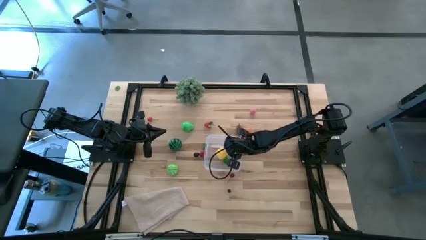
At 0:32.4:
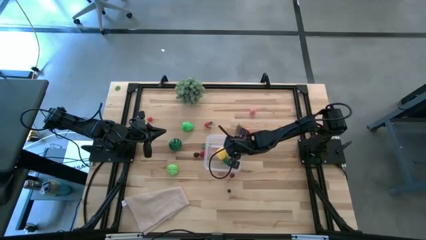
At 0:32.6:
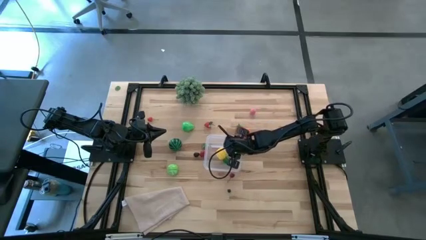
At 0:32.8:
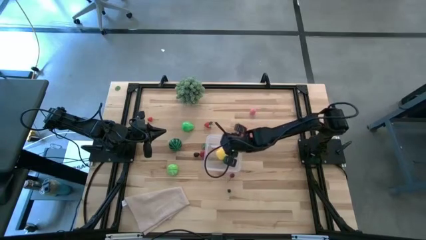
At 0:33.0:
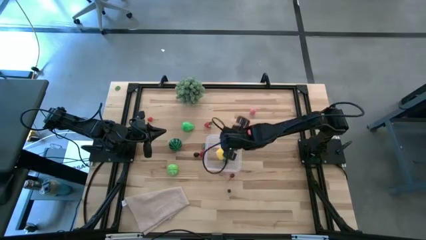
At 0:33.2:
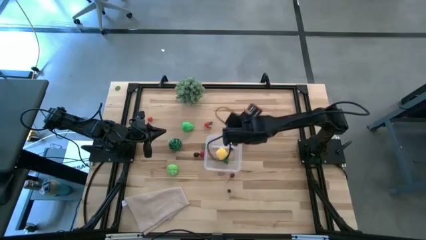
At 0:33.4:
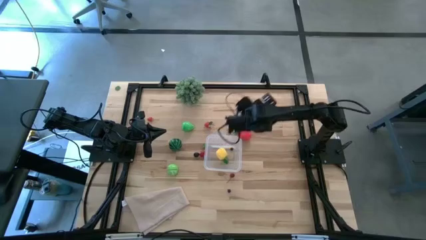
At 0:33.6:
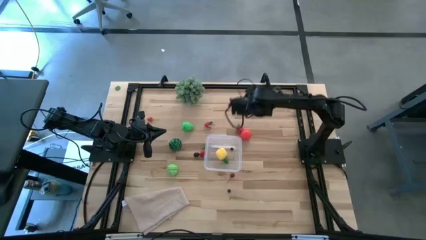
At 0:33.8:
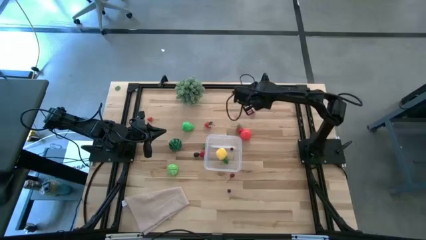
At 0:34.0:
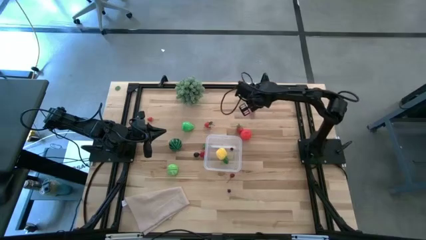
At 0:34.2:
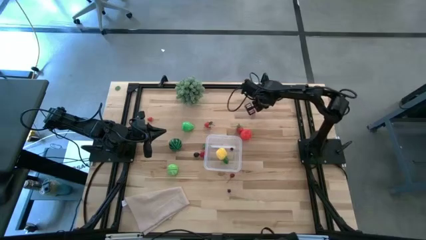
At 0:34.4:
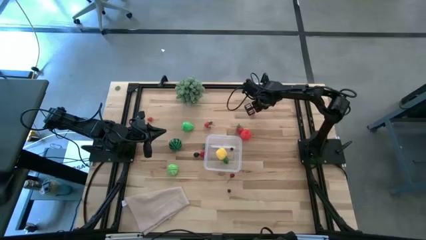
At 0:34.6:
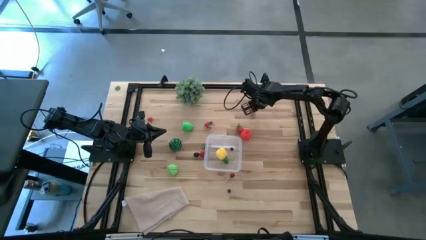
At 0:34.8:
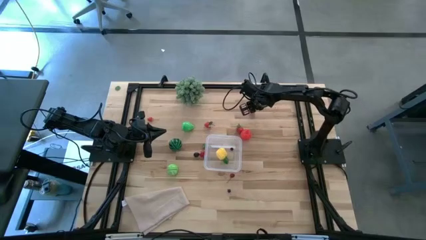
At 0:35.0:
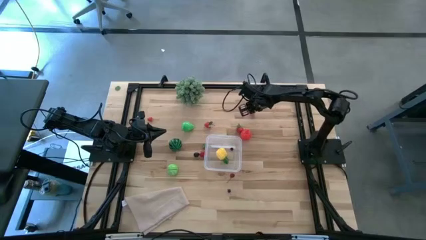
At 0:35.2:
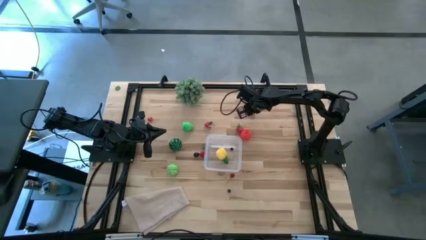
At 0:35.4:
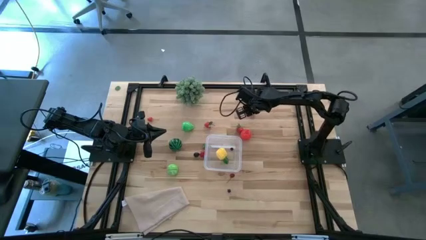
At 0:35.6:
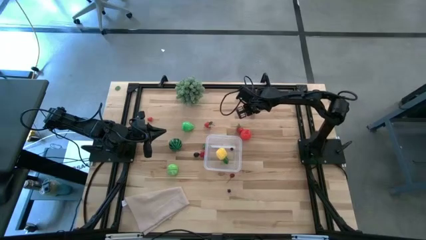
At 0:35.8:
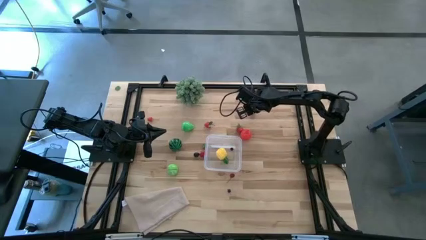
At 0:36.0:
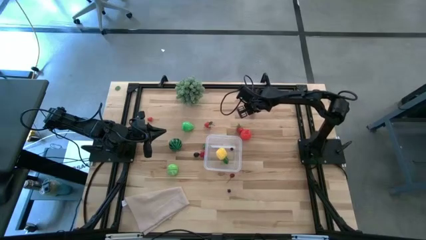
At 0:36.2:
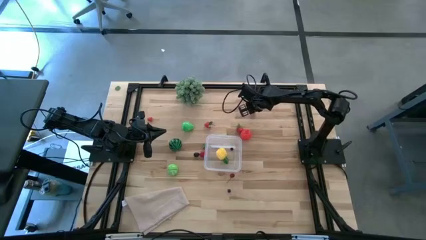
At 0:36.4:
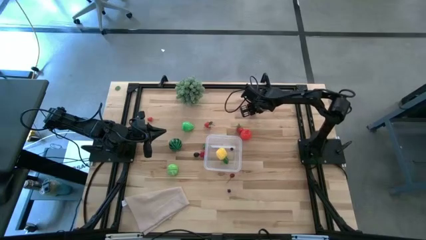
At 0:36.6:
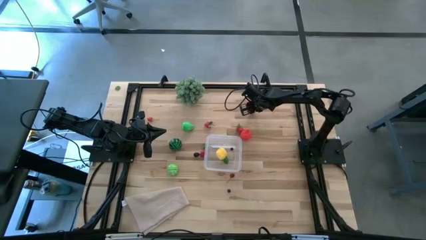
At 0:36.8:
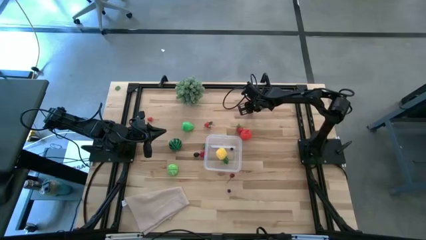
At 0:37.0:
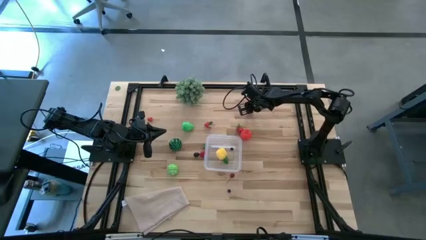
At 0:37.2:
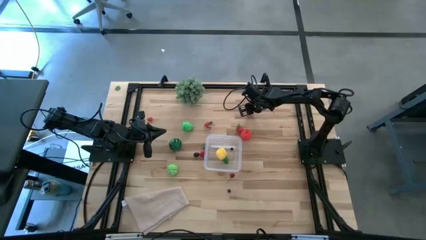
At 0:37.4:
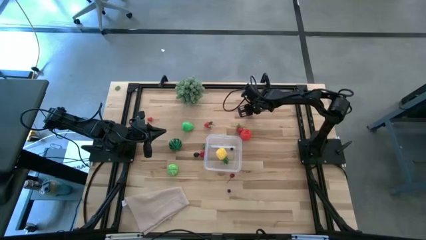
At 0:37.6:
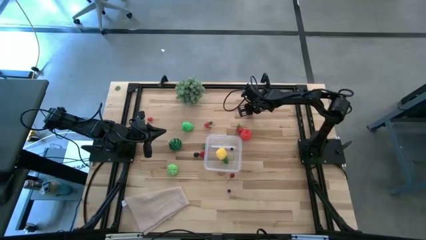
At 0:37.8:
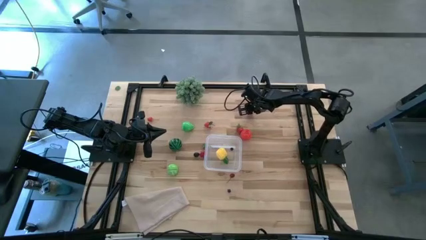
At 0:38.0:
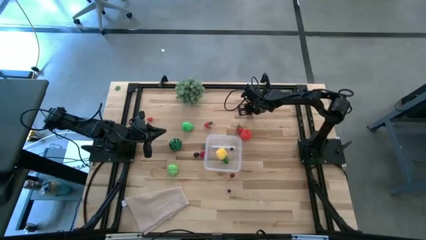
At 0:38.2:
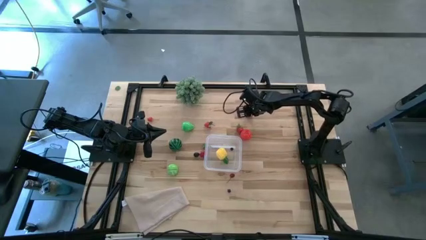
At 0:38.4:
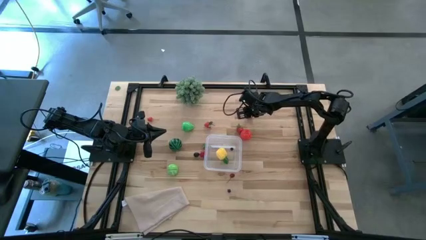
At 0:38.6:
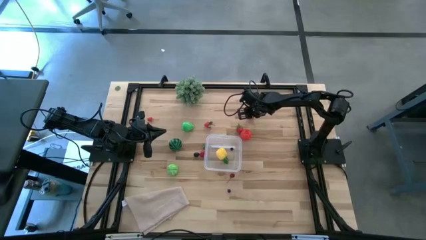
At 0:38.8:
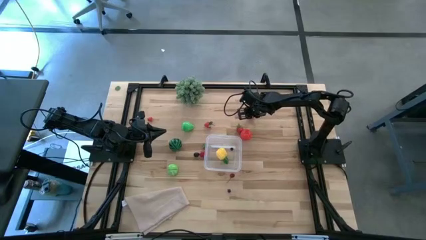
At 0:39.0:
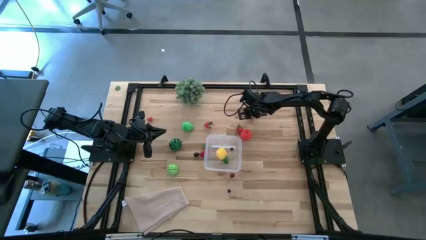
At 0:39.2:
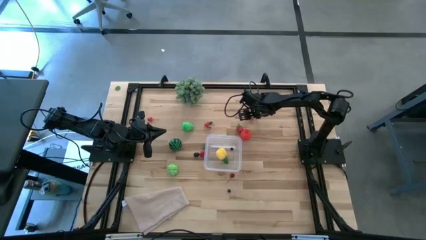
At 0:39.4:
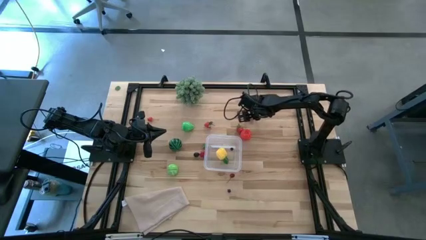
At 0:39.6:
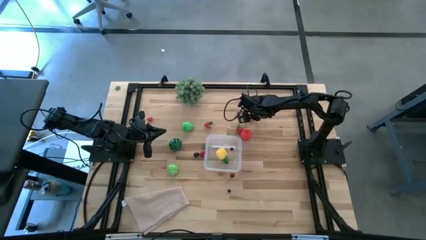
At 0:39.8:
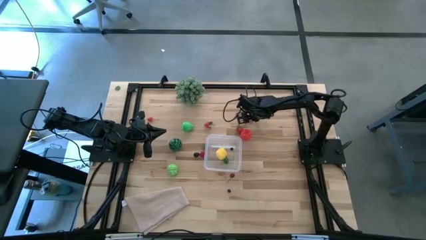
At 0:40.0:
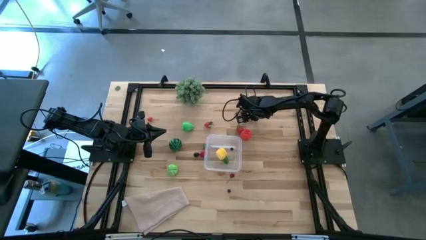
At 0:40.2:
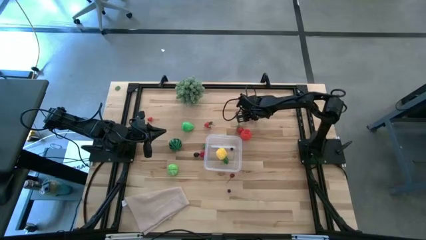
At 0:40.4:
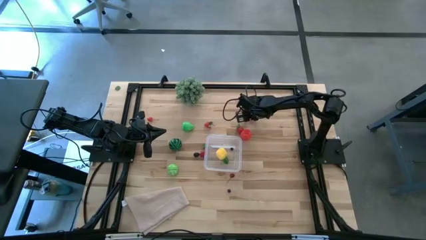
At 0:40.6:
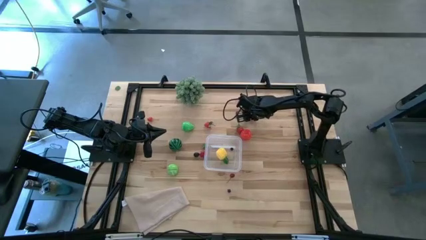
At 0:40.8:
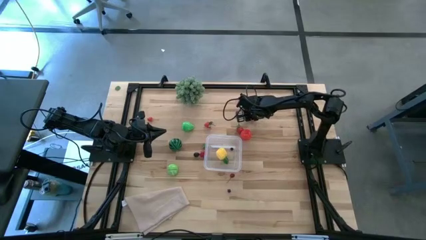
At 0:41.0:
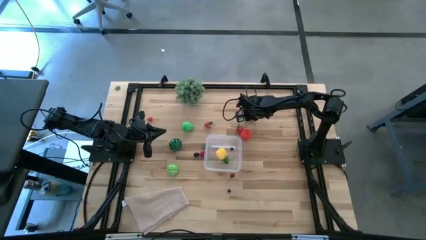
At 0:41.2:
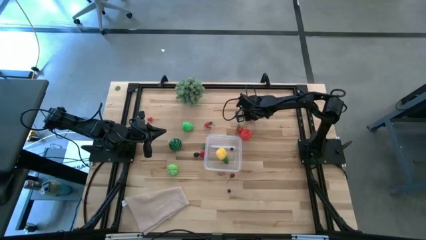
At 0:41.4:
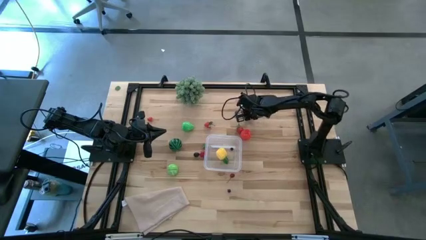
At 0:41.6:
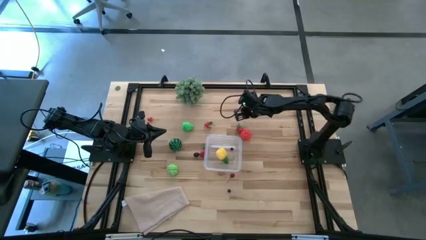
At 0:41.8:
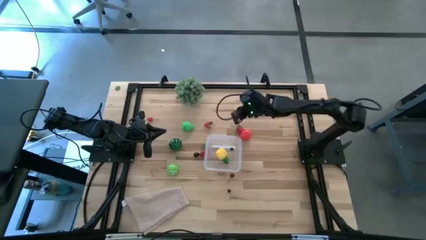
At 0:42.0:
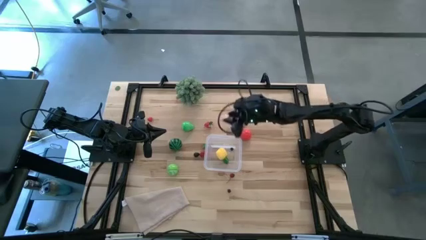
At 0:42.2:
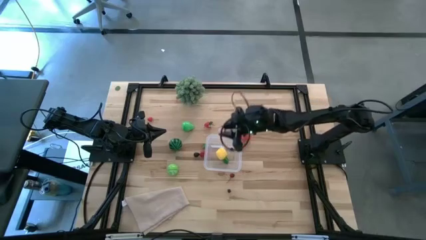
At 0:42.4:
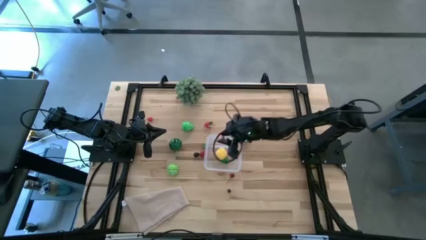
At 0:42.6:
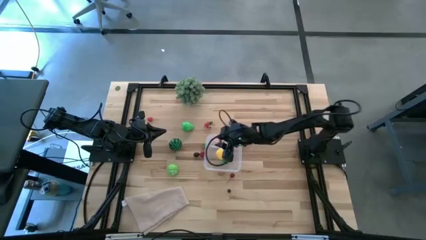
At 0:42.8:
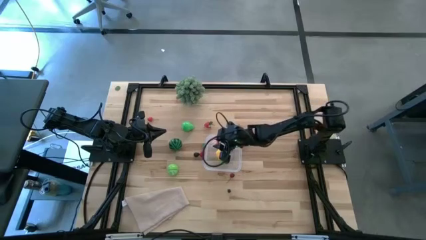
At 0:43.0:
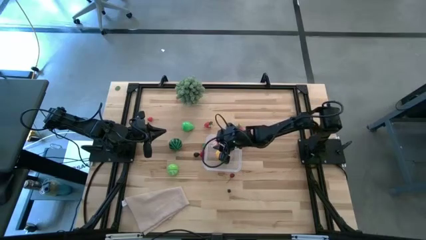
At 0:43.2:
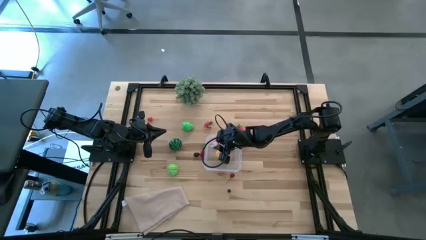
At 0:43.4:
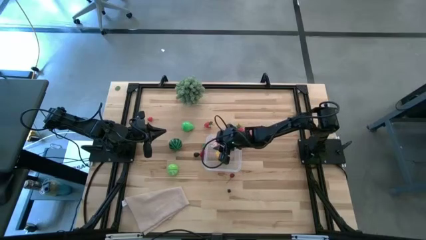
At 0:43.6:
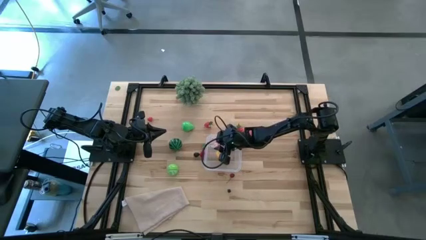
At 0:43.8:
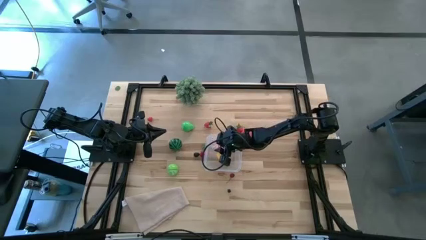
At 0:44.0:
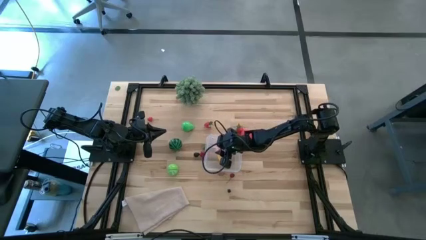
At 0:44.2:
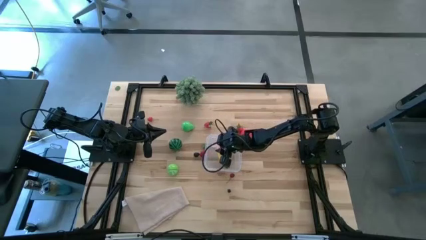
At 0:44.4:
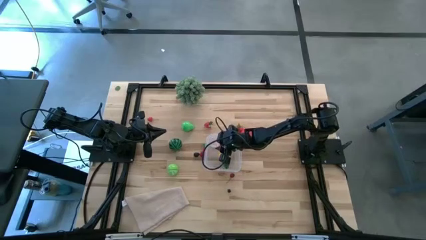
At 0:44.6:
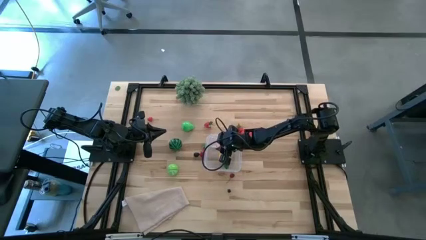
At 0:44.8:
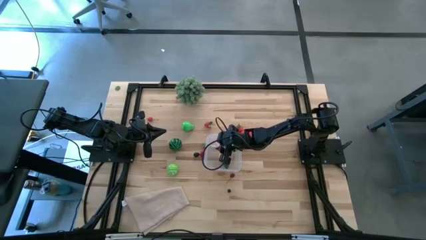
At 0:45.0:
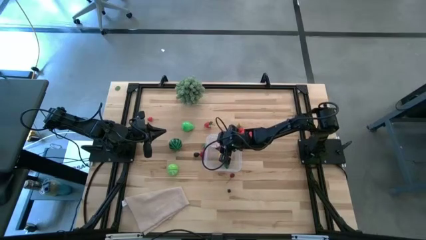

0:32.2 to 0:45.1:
Task: Pick and placing Produce into tupperware
Put the pink peach into the transparent bin
